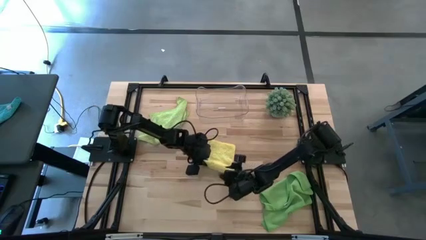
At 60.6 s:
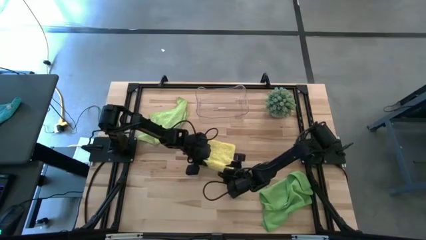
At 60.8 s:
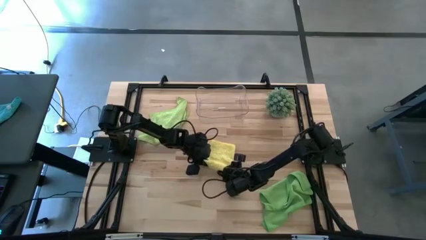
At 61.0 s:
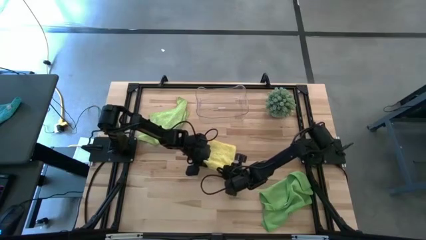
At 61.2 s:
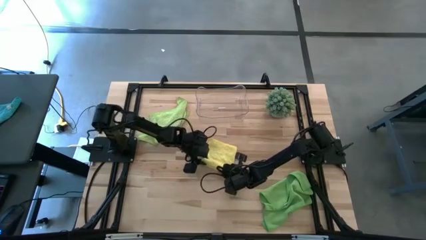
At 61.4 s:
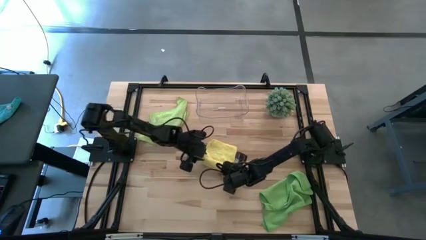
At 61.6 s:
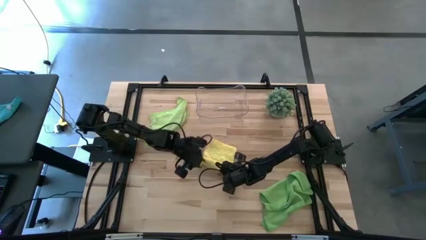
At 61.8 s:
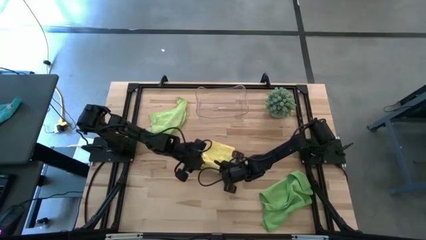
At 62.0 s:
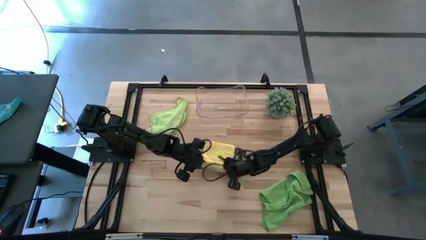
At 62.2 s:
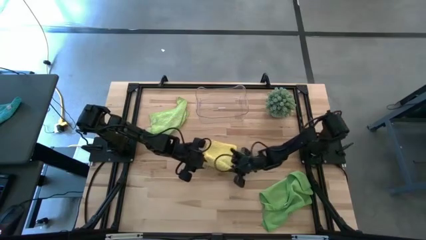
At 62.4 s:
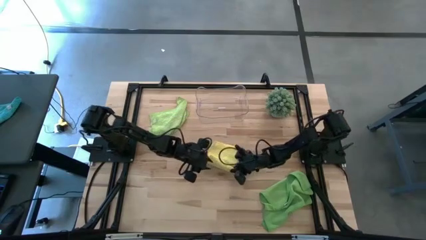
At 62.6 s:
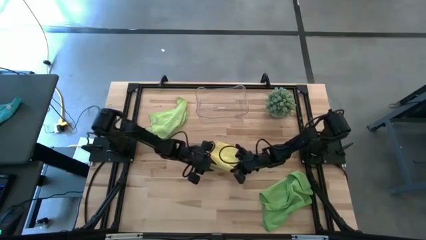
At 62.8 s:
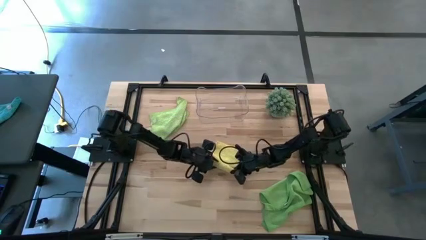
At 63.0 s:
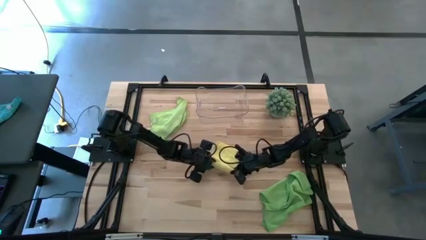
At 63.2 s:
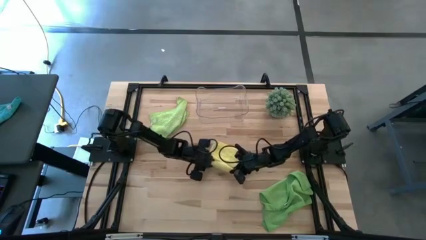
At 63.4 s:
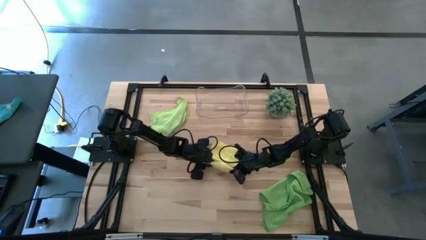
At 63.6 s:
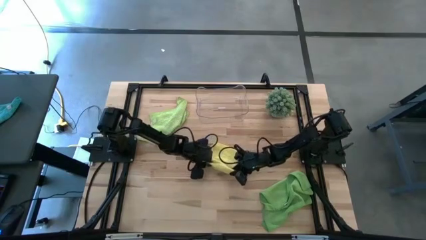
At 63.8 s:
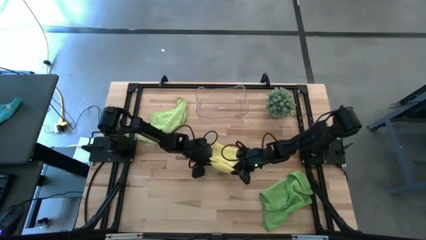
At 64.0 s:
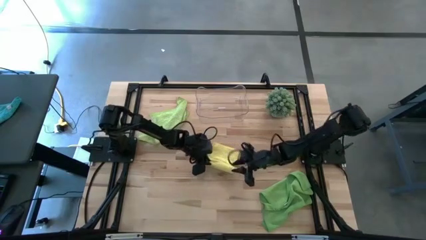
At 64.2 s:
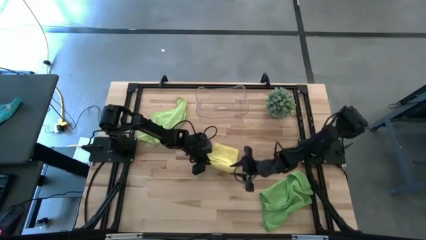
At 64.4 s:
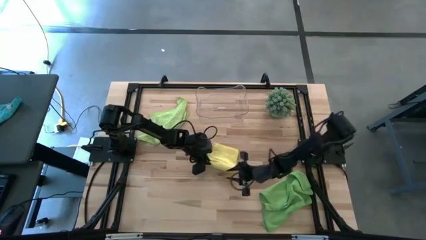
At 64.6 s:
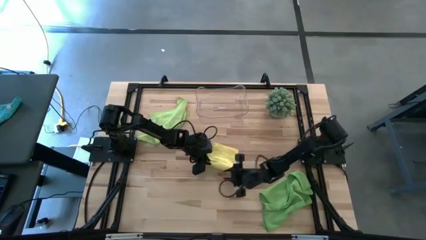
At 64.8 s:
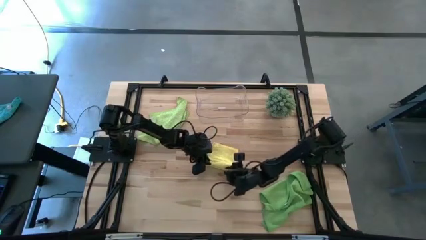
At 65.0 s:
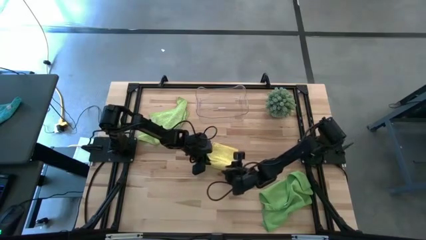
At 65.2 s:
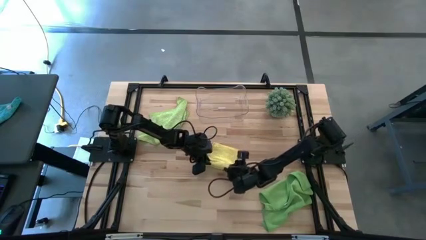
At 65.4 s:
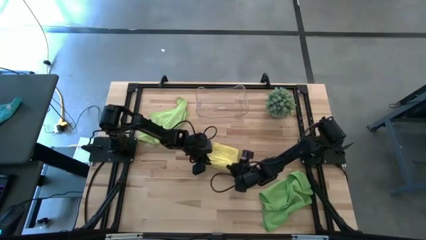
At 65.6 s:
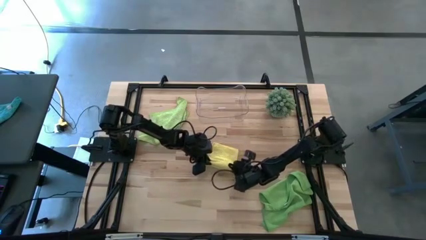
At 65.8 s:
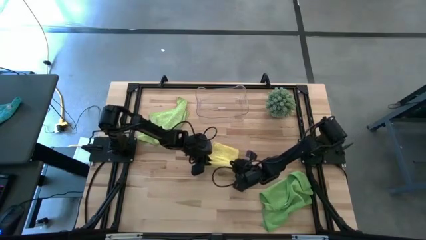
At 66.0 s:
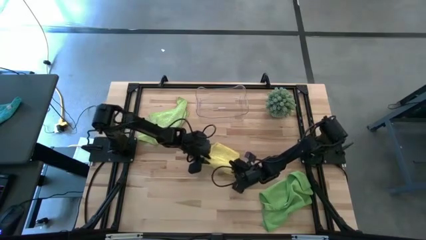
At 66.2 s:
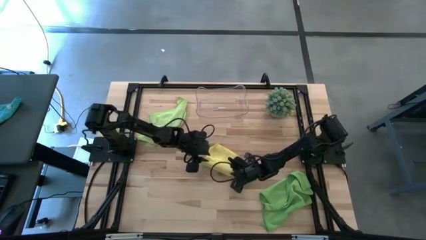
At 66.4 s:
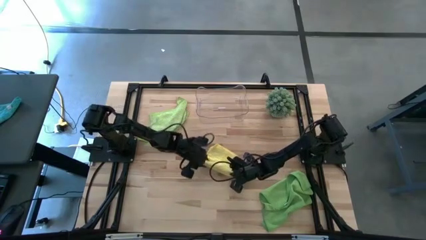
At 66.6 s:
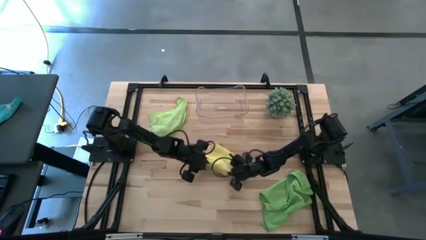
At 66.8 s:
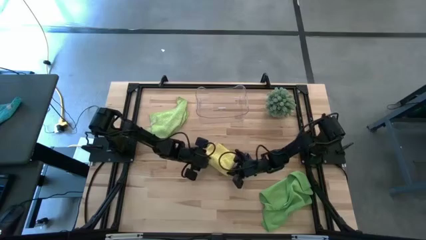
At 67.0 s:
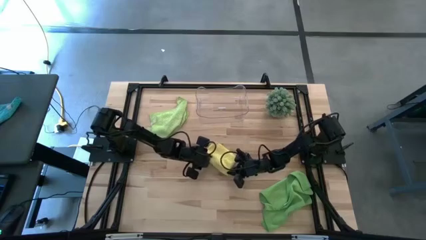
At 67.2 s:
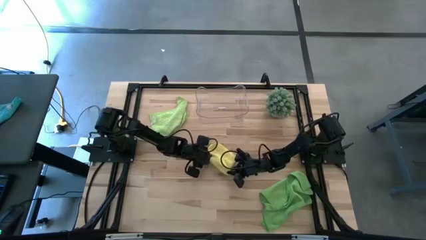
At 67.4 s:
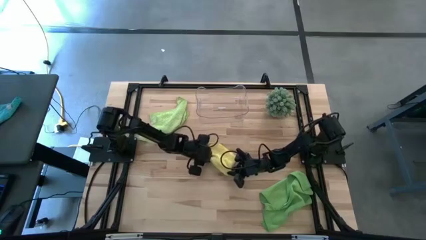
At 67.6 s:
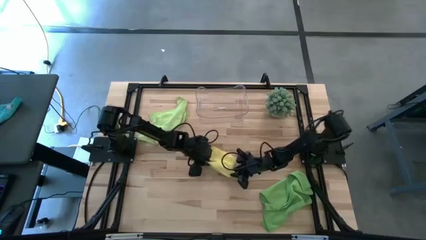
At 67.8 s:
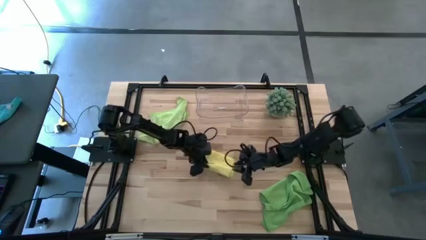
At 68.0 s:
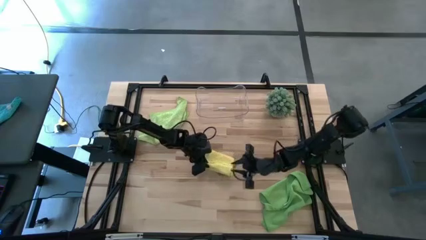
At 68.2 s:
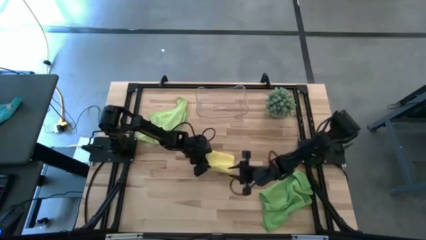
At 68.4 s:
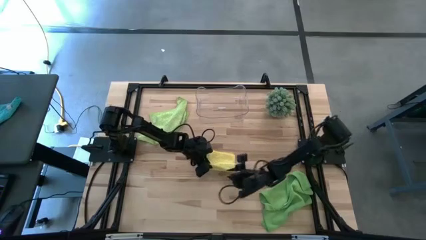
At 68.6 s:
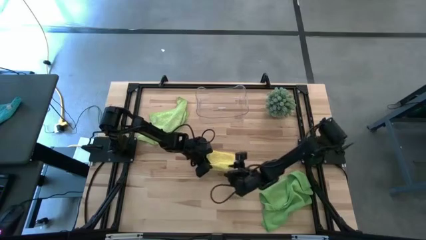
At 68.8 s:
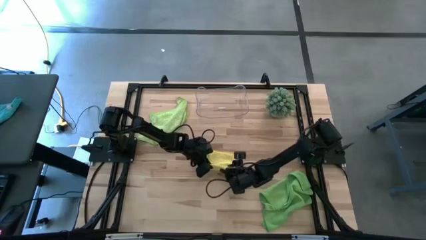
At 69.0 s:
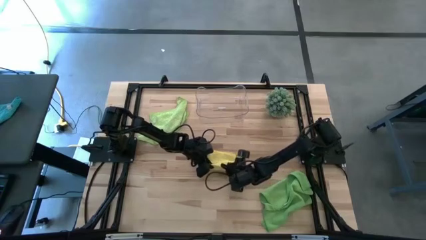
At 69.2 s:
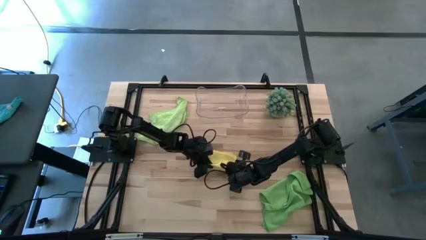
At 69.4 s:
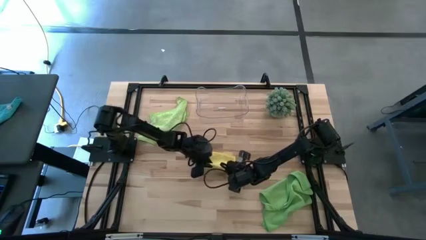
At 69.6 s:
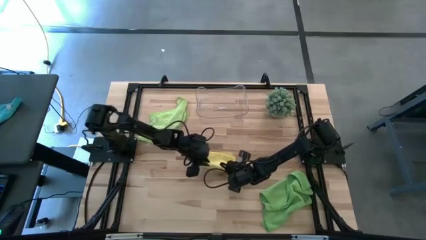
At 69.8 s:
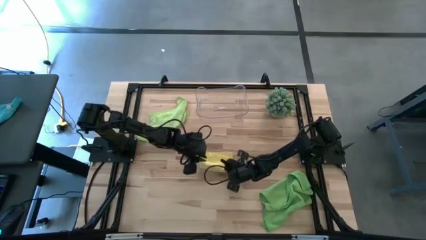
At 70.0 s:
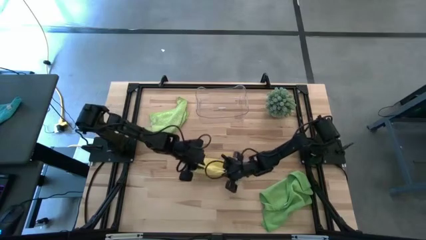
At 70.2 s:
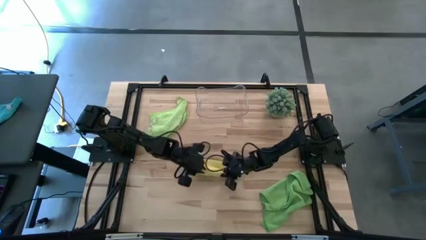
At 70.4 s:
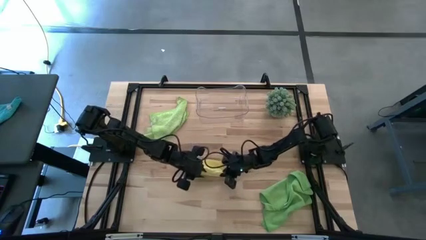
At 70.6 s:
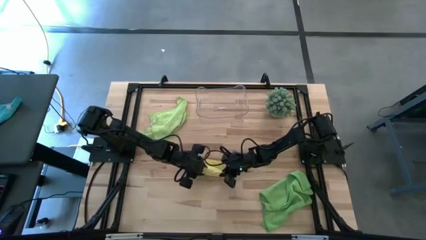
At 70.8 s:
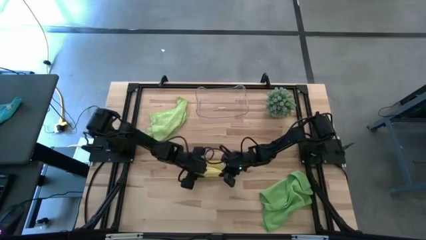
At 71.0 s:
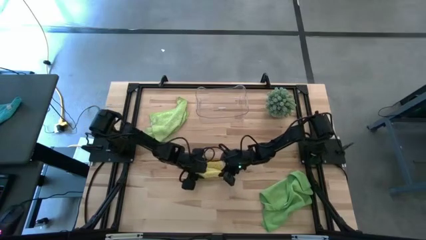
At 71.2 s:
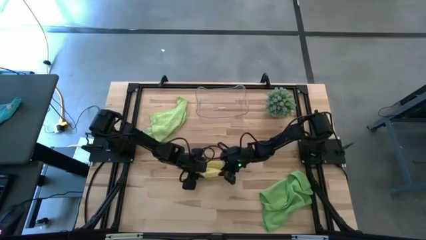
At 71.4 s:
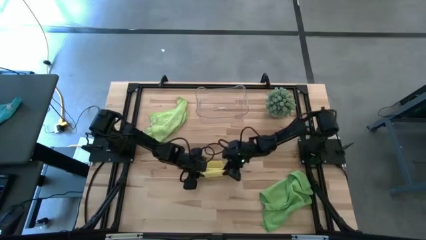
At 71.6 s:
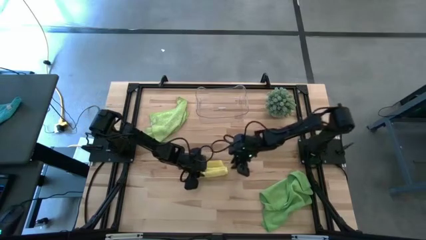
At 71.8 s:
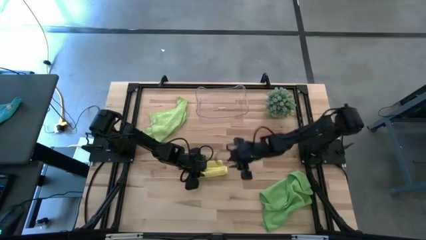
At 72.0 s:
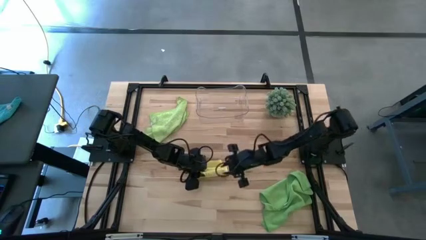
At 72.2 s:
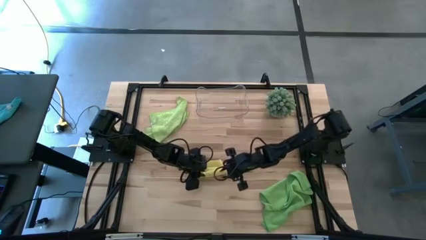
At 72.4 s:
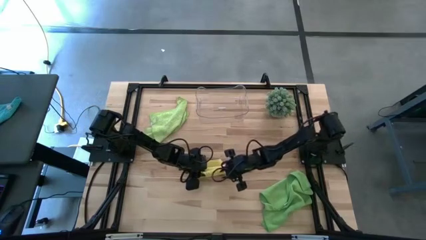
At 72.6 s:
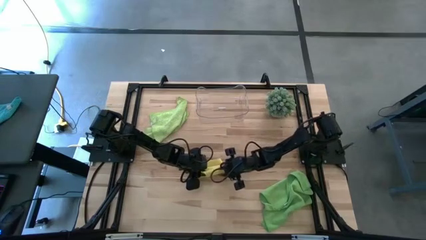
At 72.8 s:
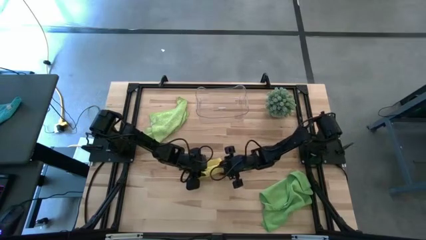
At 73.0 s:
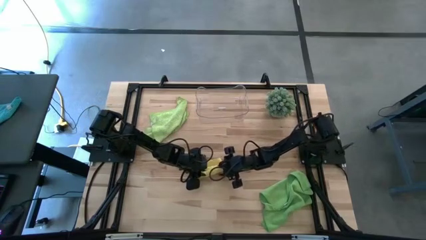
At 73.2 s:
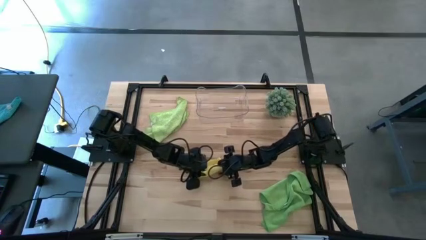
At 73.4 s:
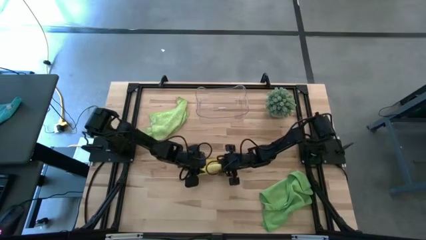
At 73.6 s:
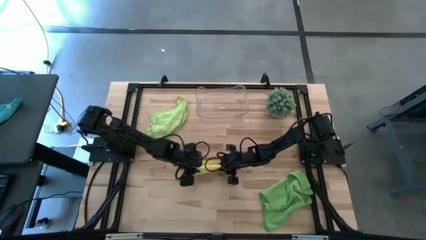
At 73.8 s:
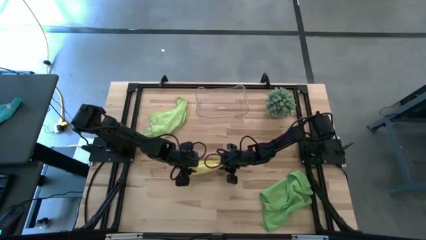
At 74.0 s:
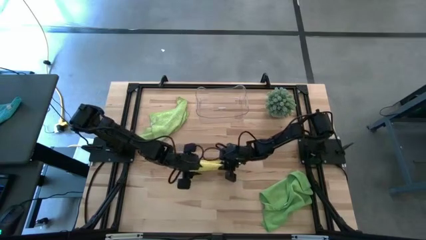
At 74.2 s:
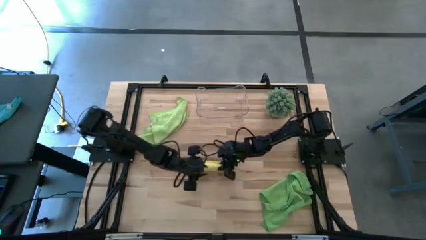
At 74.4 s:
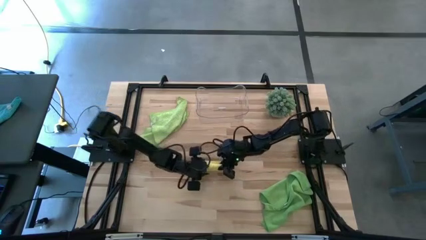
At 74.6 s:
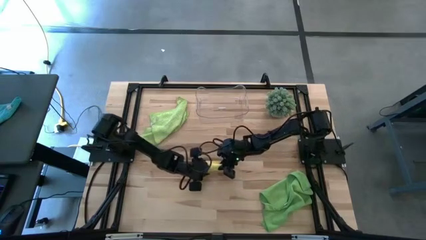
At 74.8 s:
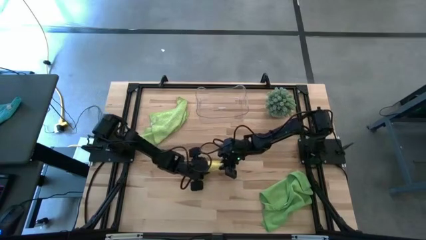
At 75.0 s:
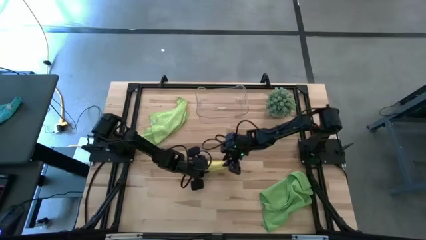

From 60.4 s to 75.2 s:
Task: Roll microfiber towels into tight, uniform cylinder then place into a basket
Roll the yellow microfiber towel
